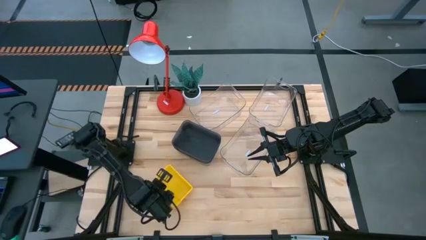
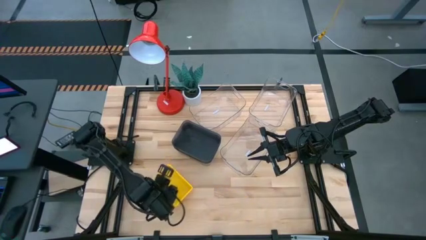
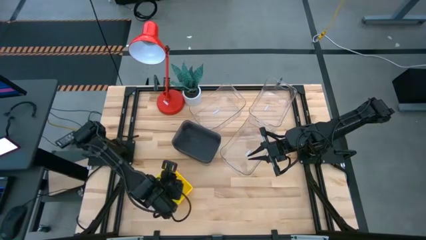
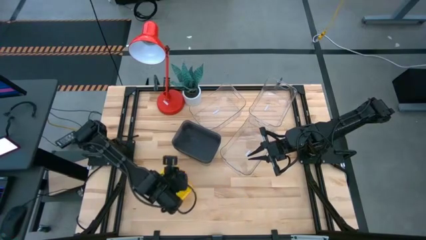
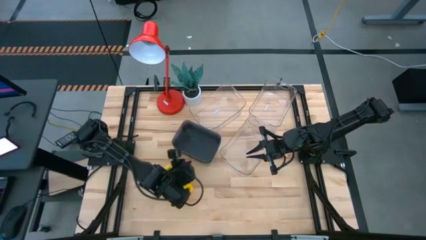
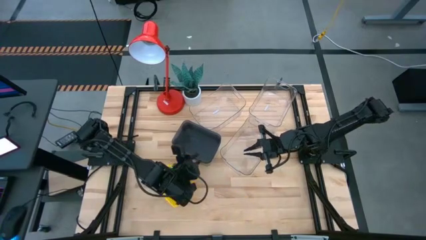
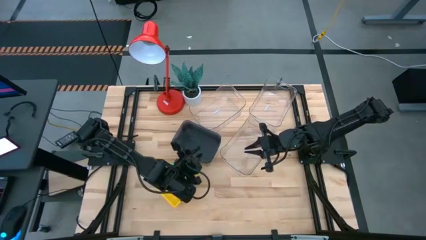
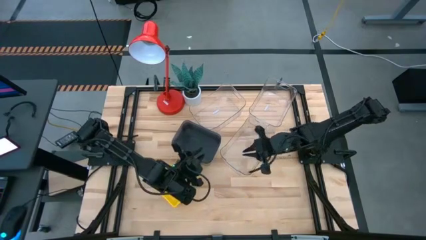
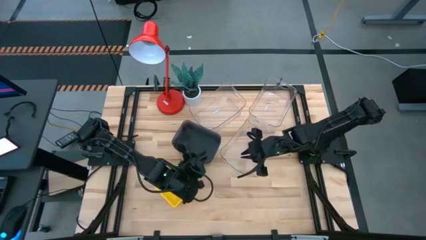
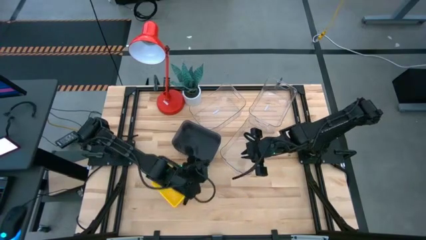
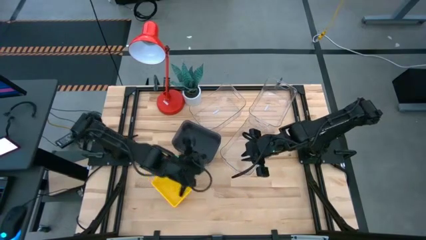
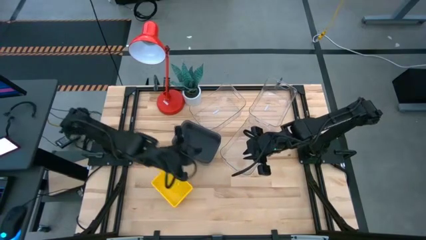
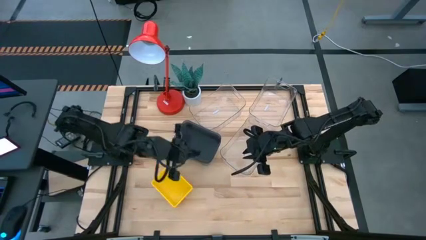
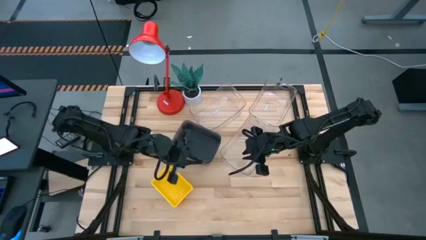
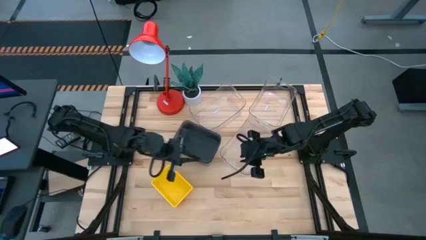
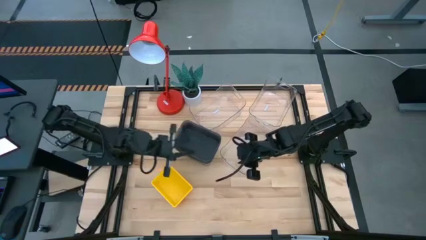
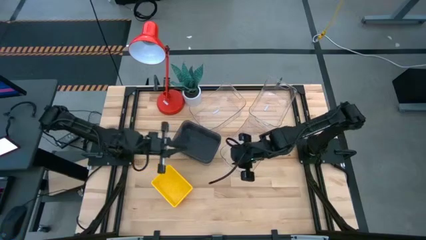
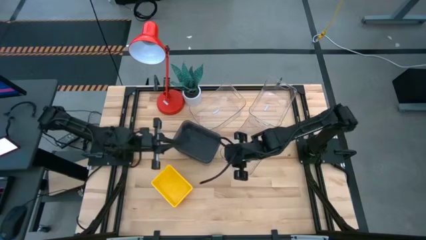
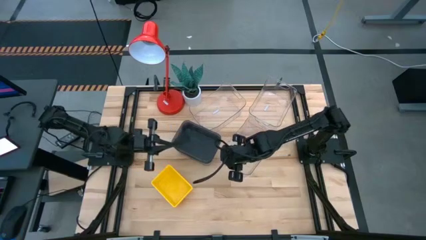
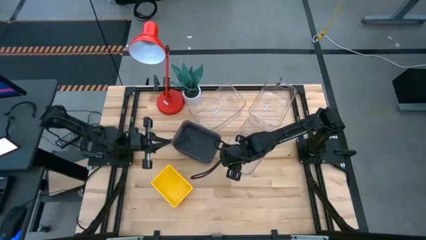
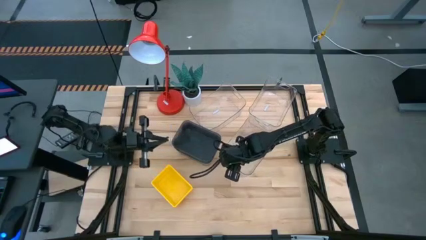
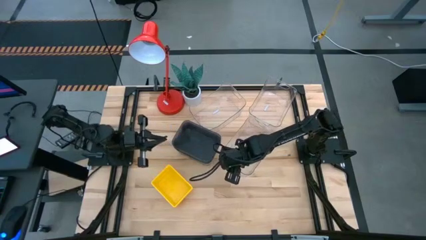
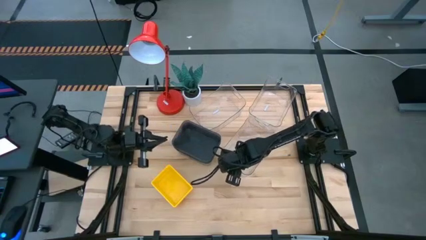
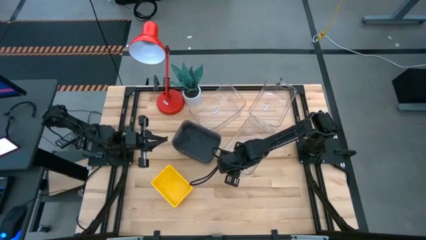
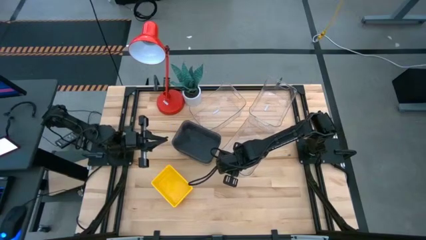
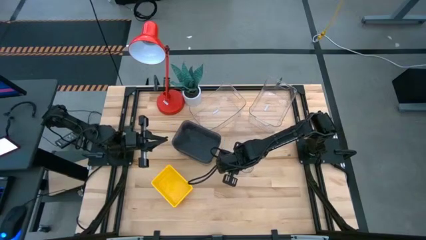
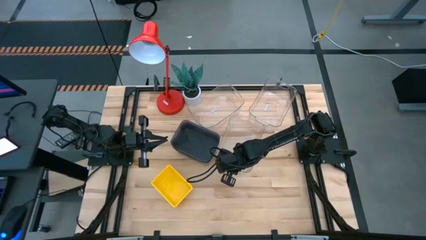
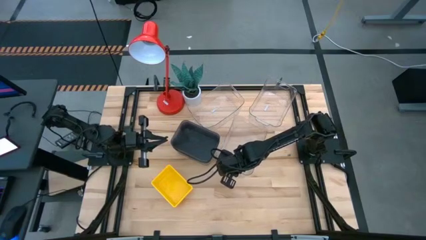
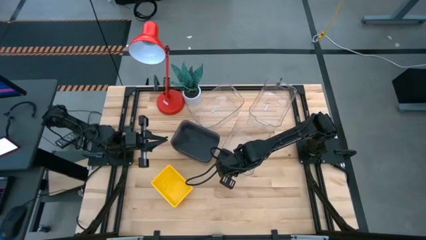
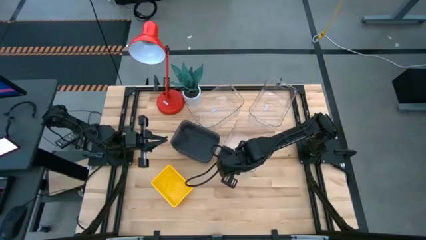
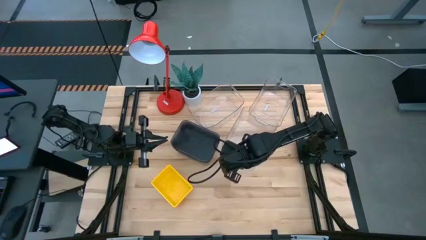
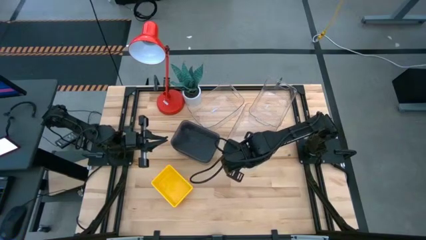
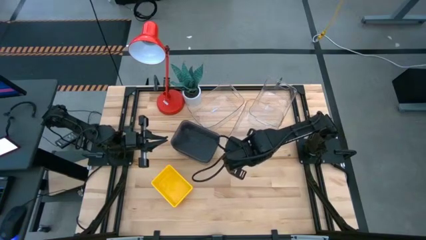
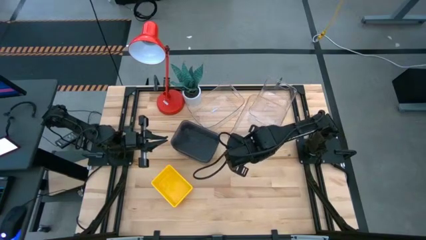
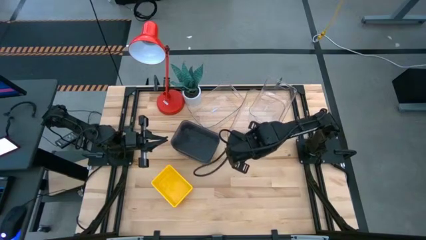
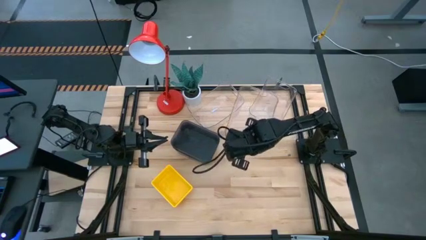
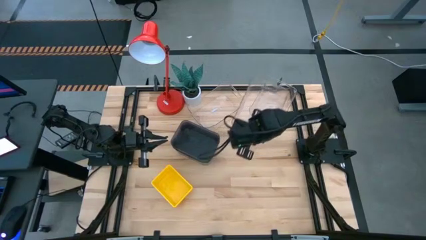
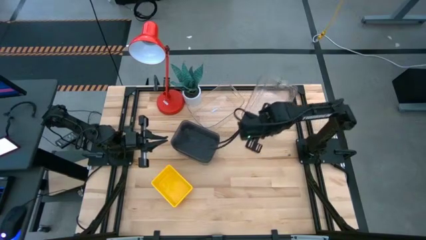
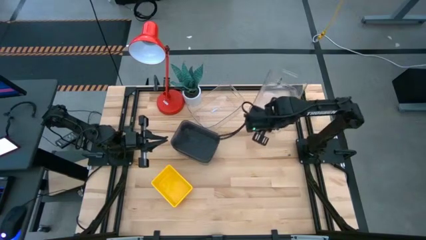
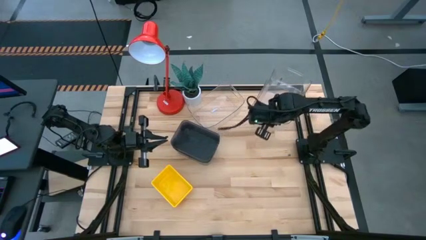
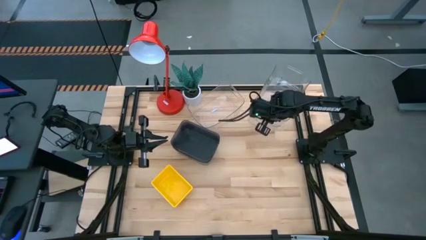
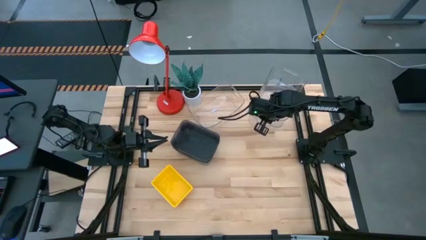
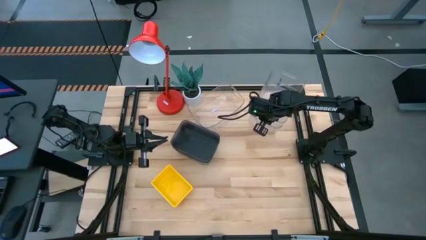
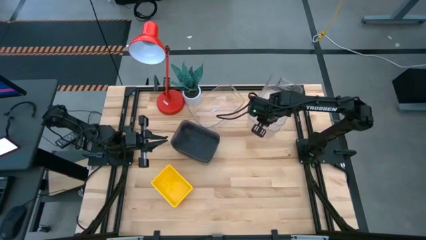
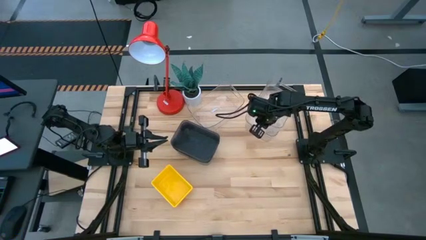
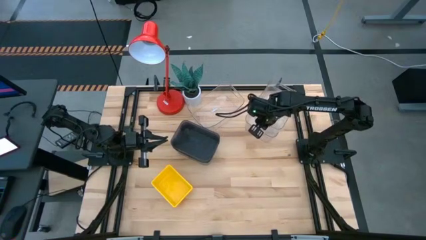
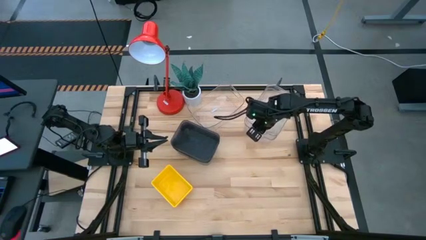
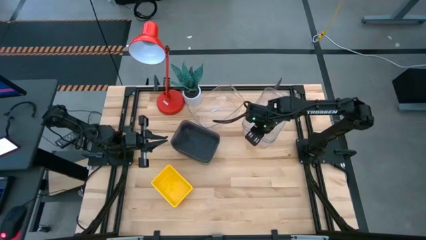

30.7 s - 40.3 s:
Stack the bottom transparent bin on the right transparent bin

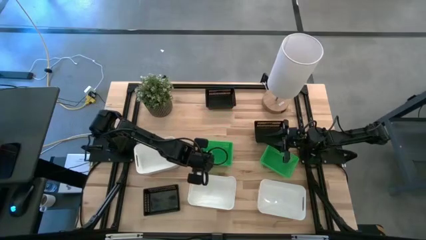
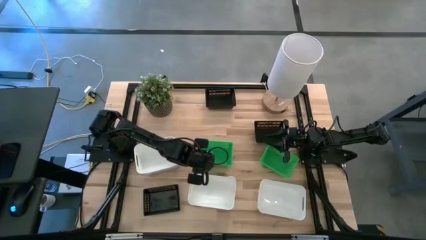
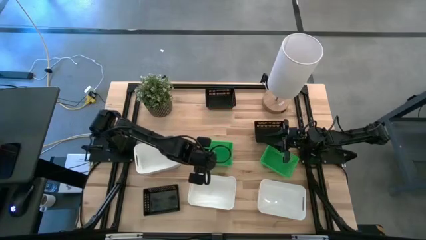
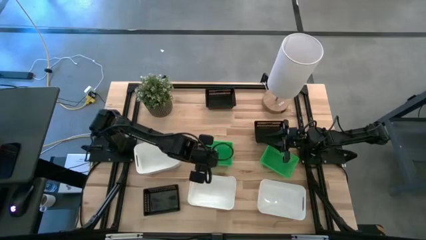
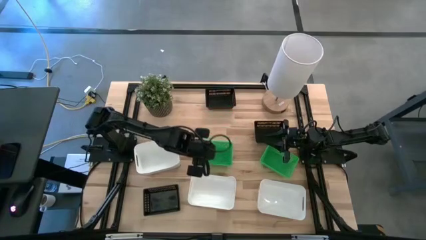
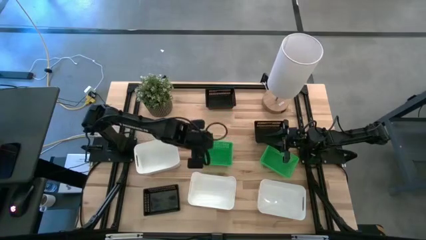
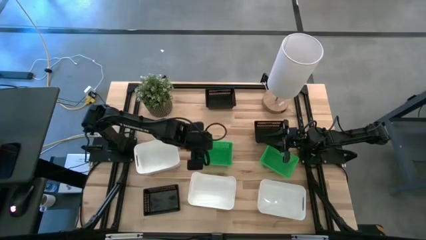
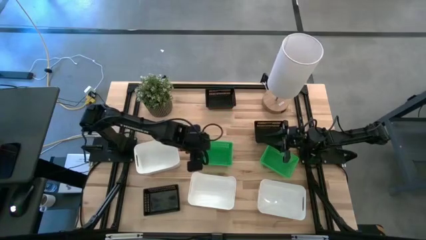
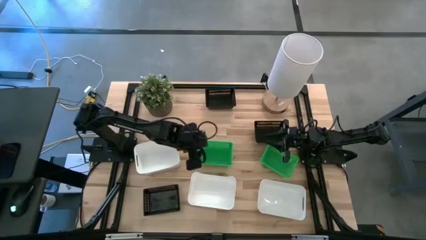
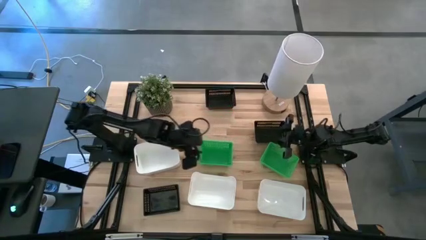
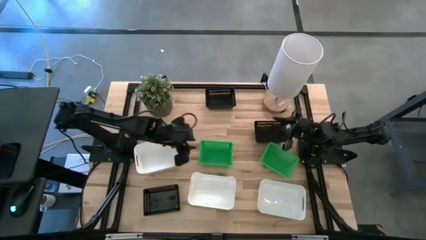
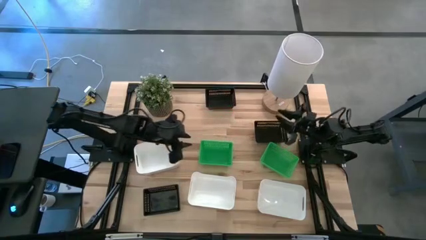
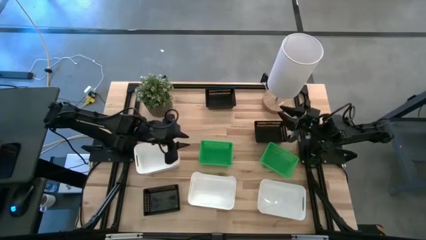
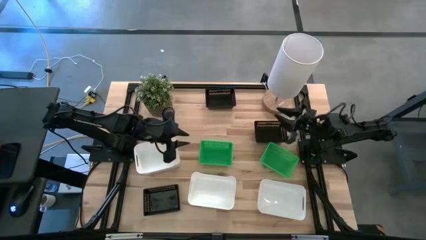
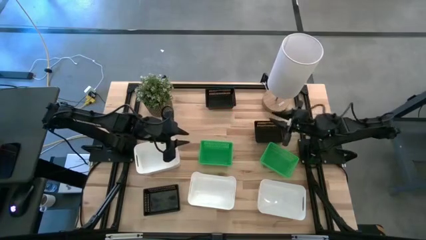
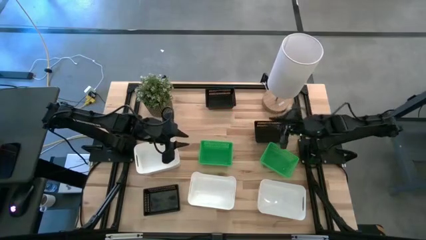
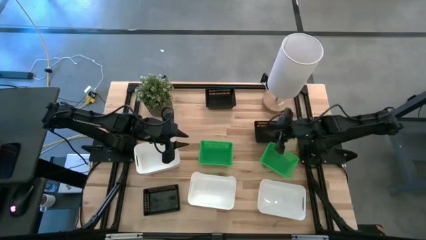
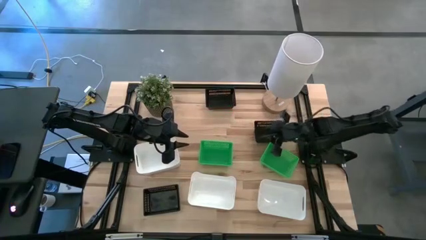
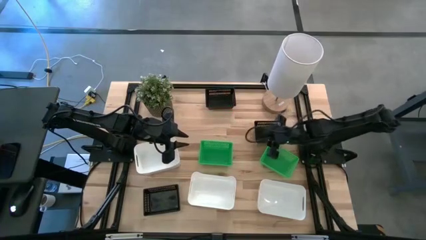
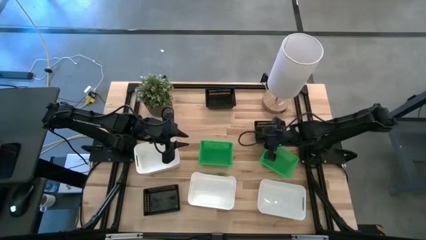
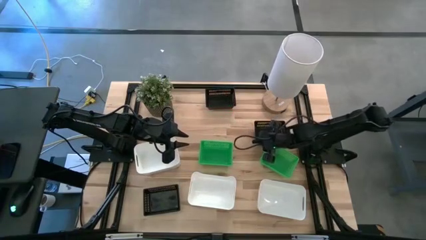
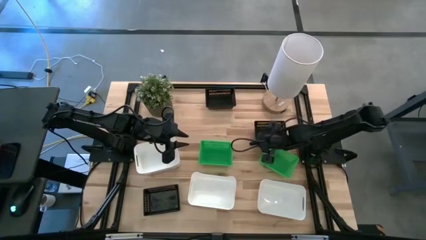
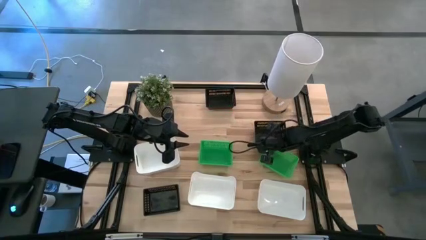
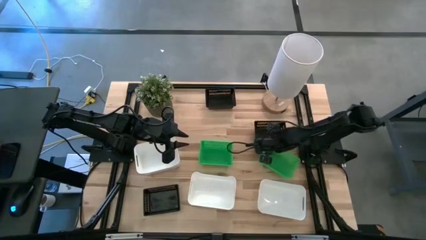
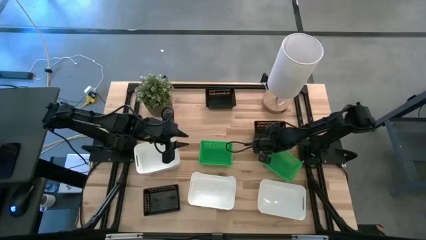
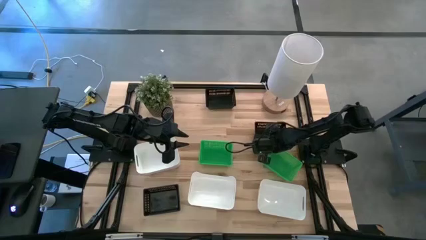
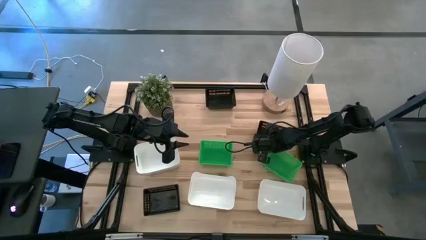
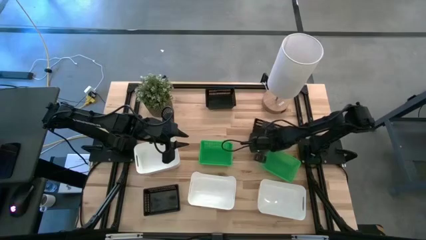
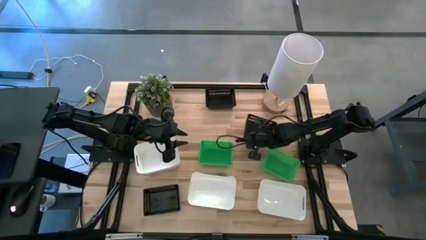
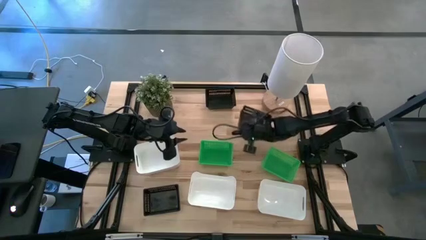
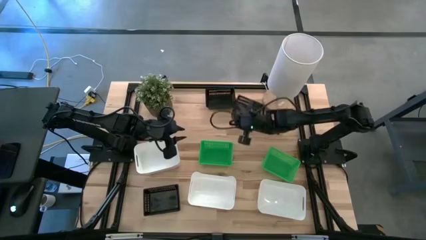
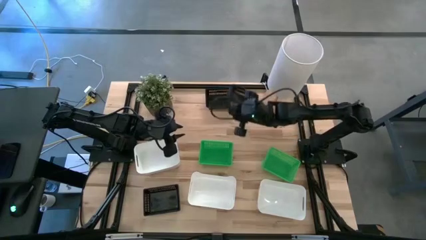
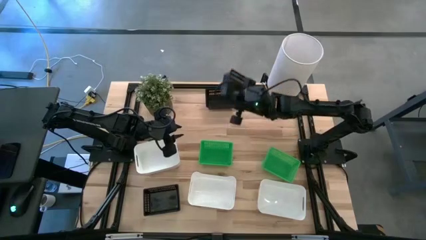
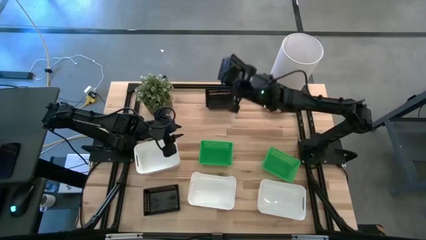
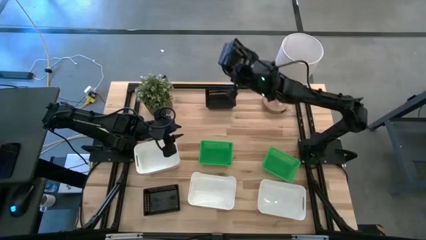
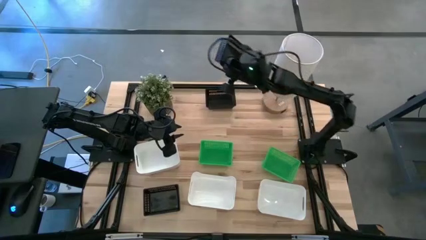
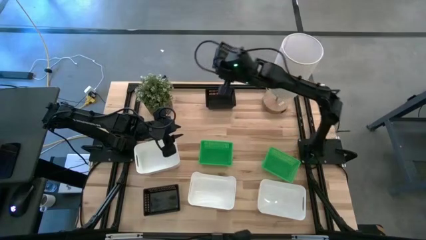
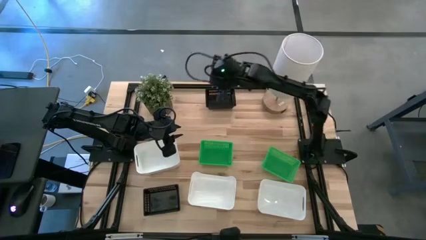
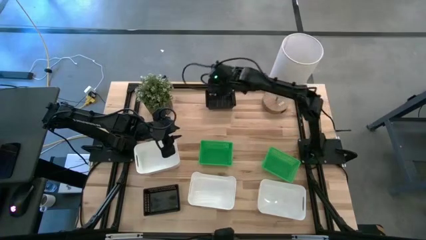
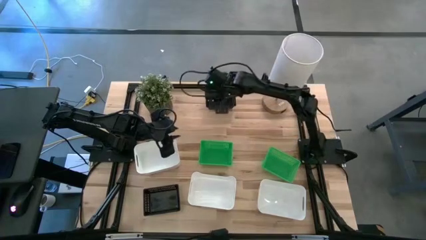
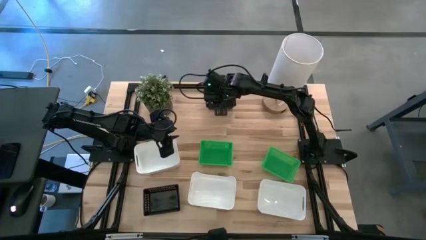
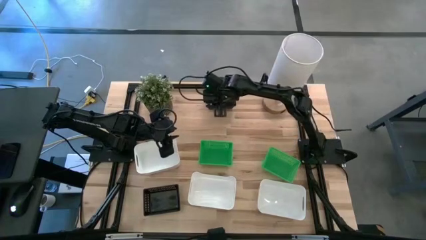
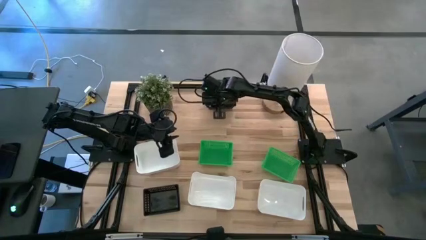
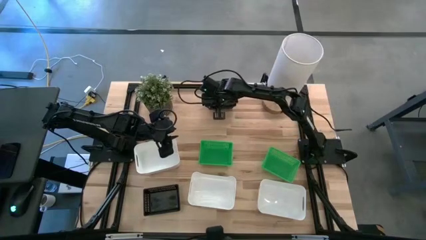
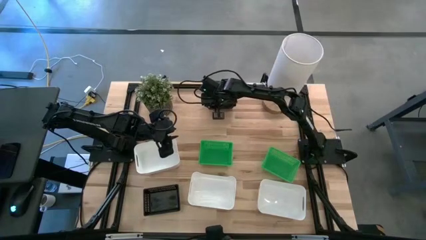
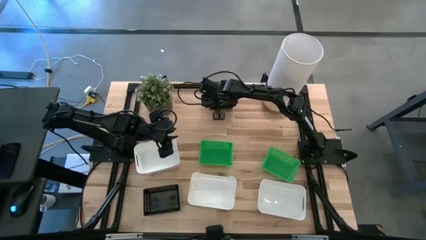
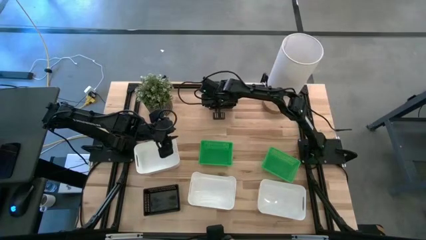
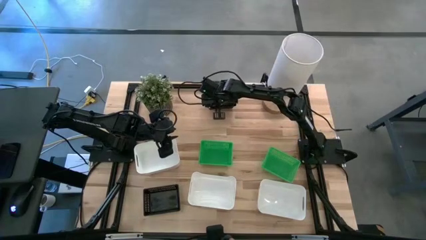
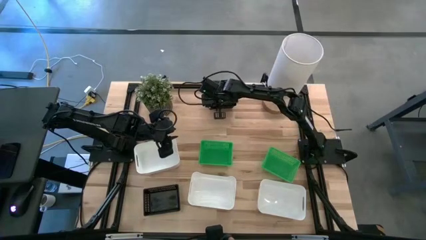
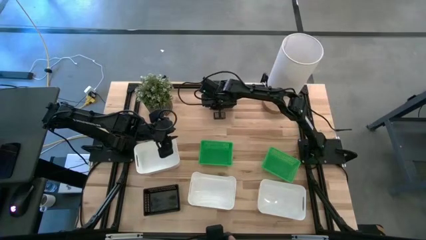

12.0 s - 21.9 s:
Stack the middle black bin on the top black bin
